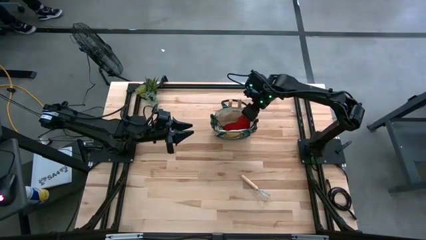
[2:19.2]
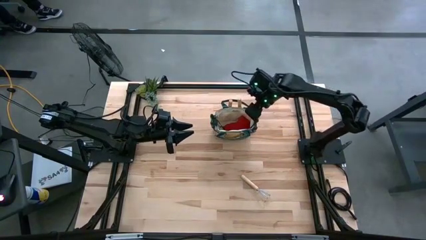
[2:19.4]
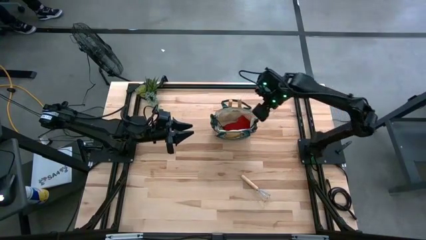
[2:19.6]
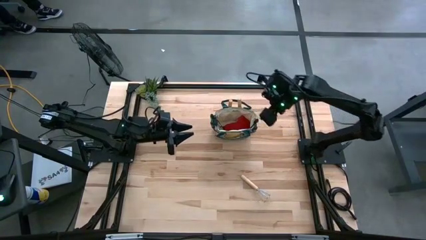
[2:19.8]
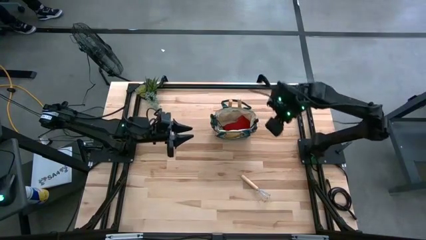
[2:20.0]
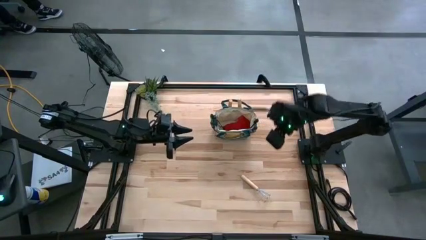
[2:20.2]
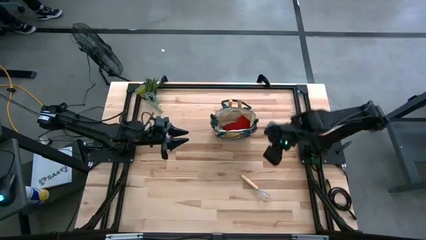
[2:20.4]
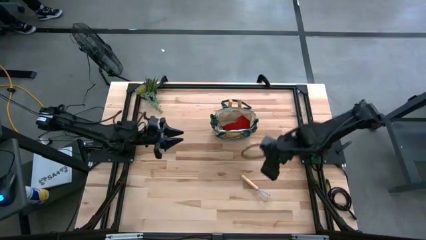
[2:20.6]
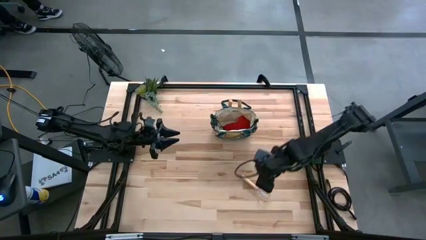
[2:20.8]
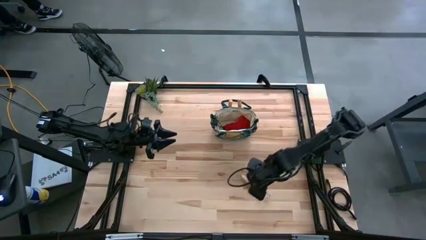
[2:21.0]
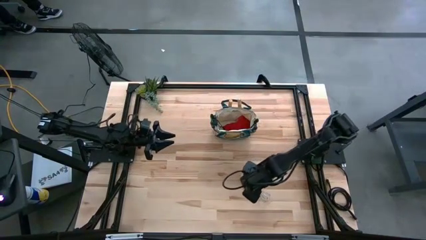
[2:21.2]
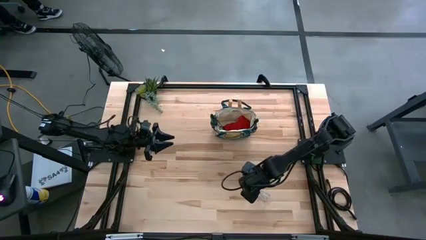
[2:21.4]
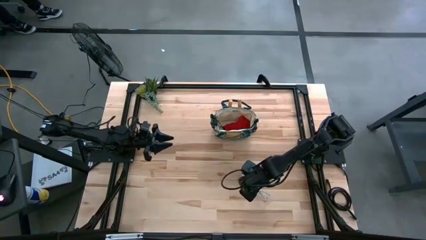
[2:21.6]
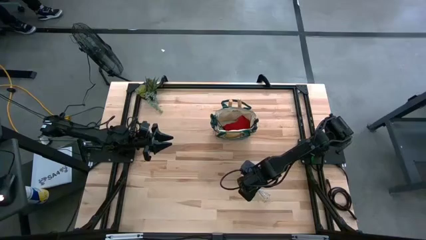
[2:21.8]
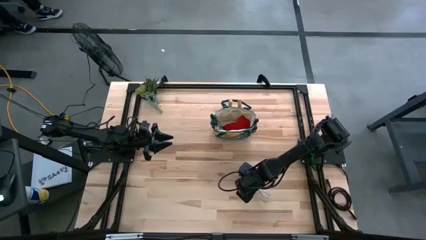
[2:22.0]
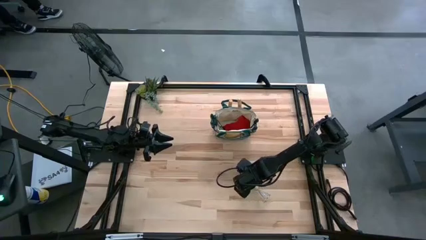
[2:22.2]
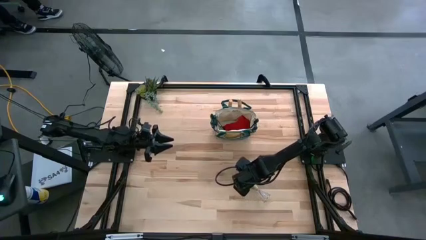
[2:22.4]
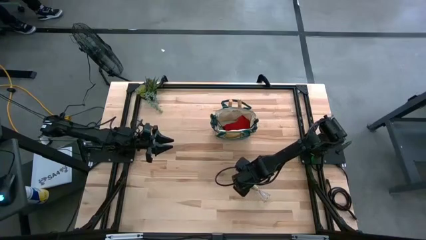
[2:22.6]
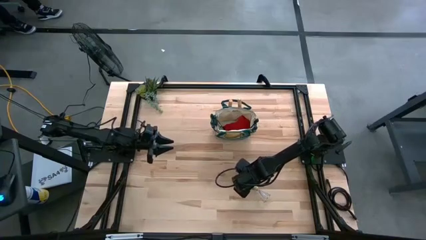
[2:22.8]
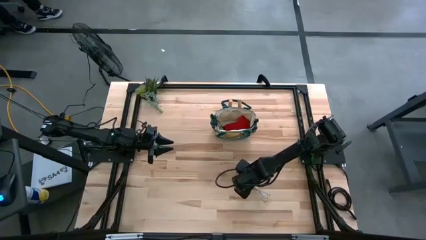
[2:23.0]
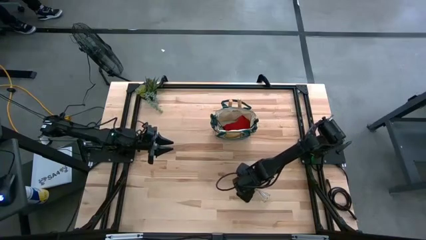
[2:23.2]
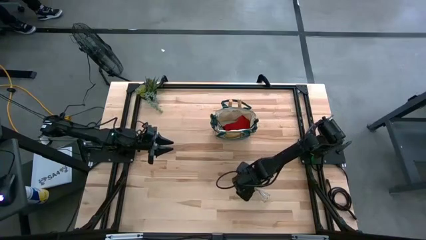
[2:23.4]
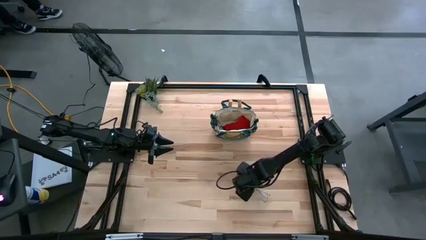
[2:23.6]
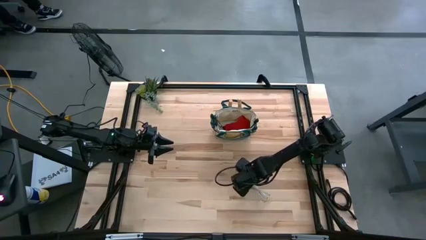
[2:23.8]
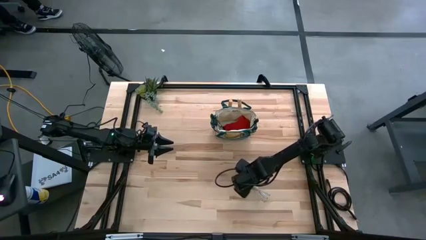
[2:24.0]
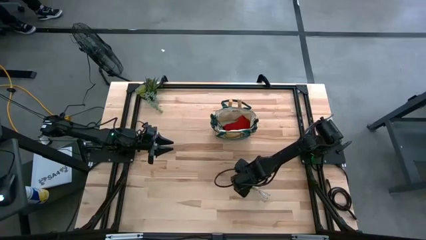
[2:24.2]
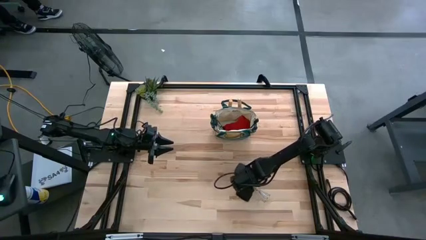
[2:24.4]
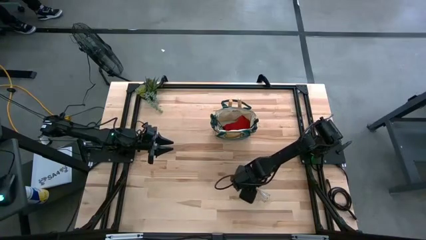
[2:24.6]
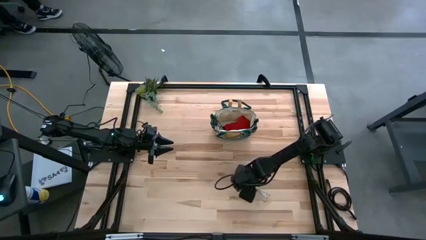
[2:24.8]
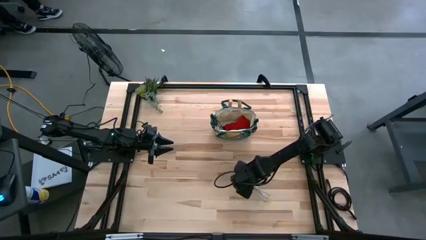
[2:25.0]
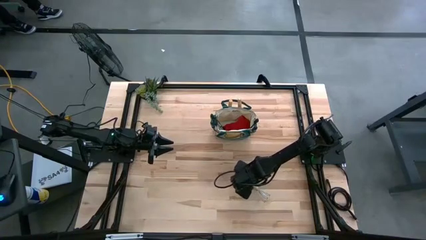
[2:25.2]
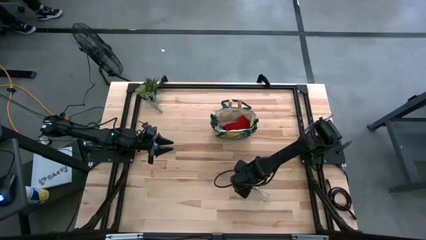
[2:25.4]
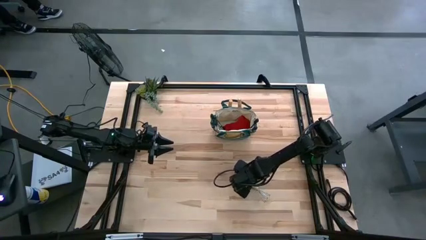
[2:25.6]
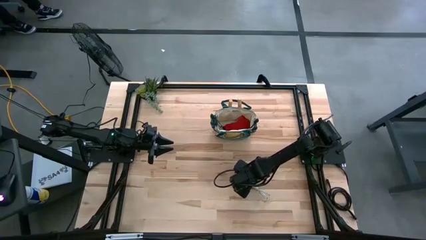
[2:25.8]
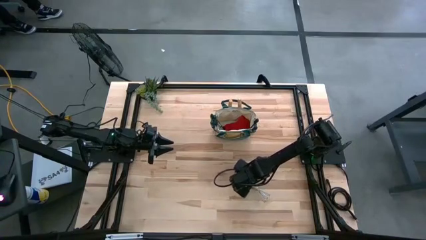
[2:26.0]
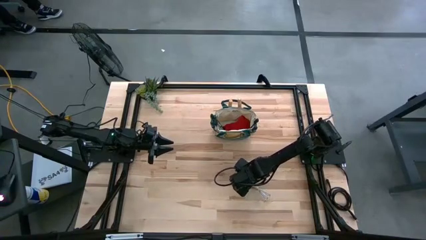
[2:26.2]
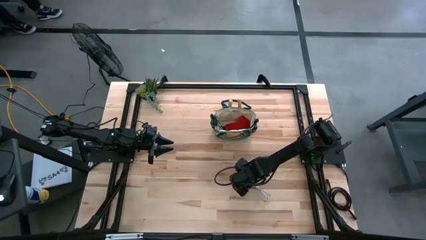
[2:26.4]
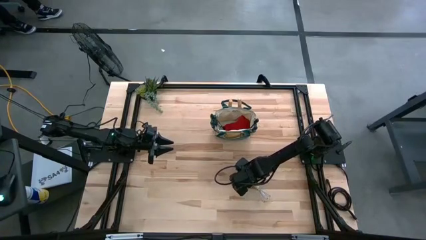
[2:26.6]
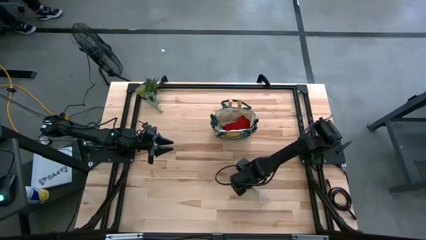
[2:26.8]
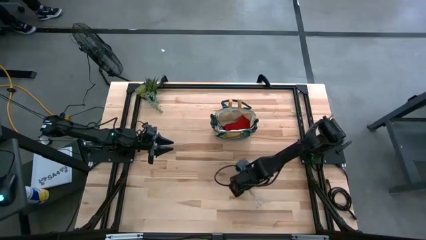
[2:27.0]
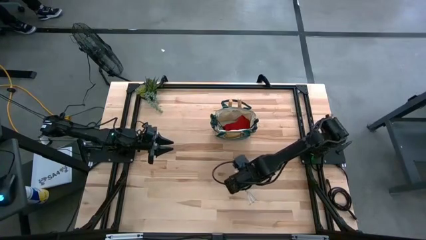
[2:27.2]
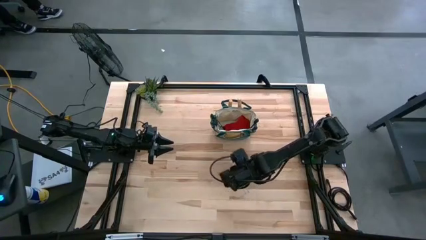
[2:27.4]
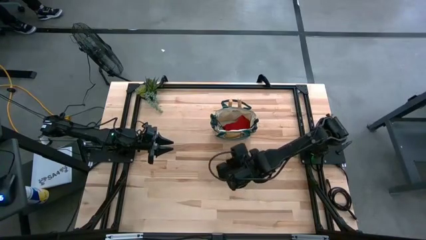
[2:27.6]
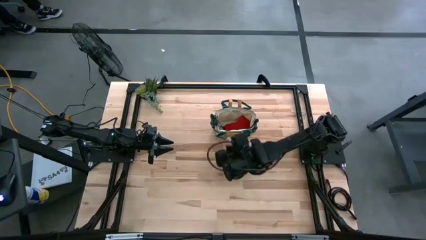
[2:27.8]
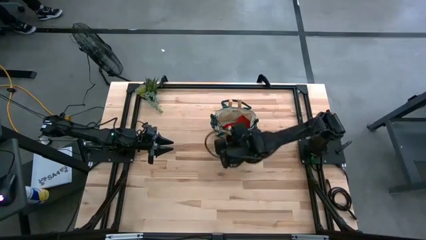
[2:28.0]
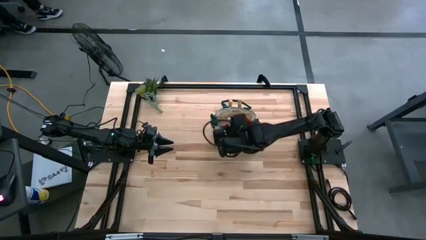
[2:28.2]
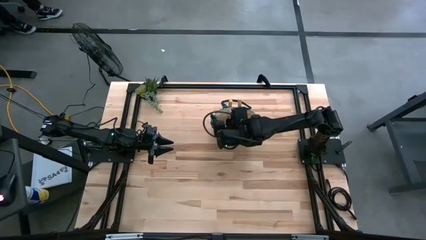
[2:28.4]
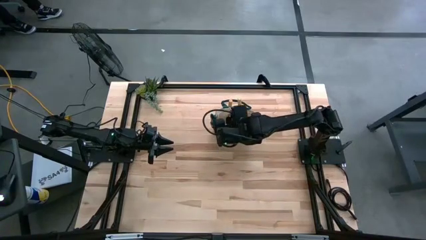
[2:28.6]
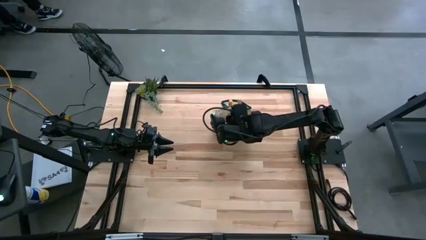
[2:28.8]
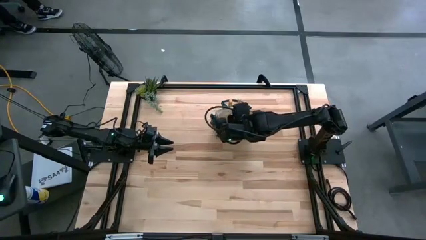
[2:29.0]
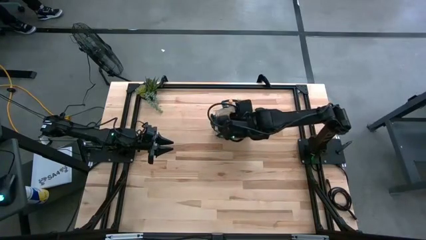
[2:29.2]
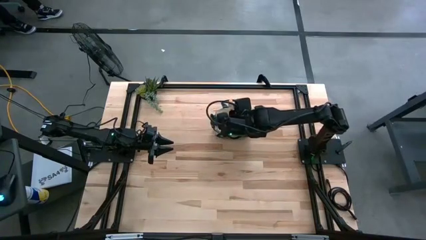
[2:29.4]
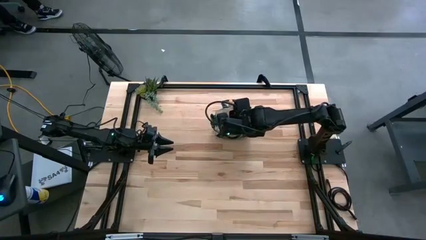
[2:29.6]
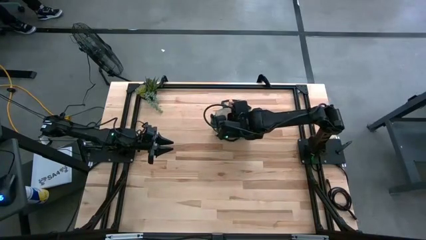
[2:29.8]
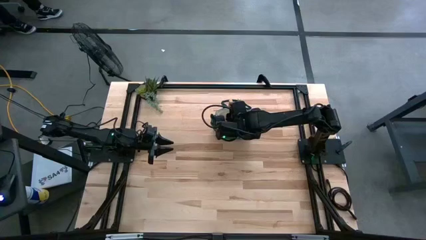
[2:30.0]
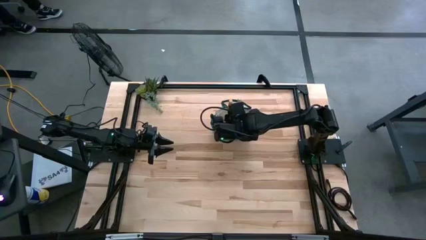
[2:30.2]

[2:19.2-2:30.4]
Task: Pick & Place Garden tools in Gardening bag
Put the brown hand rake into the white gardening bag
